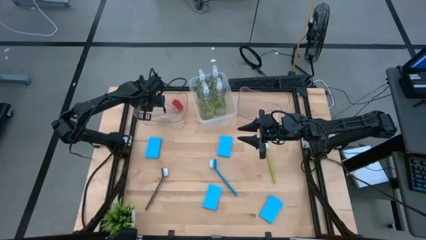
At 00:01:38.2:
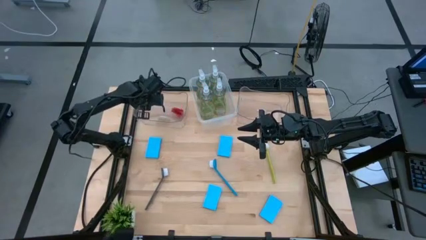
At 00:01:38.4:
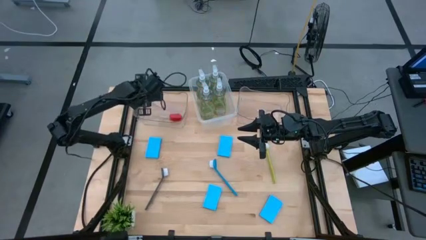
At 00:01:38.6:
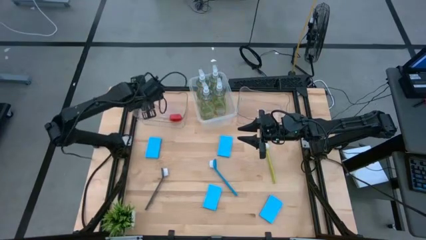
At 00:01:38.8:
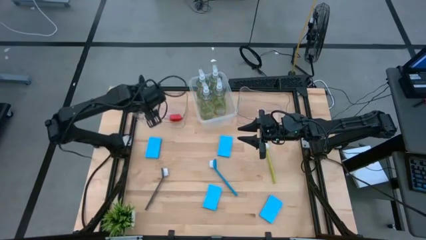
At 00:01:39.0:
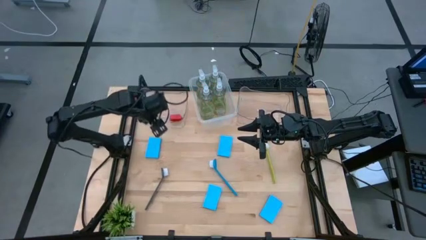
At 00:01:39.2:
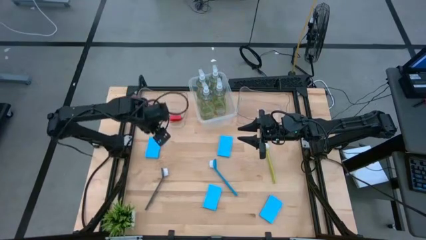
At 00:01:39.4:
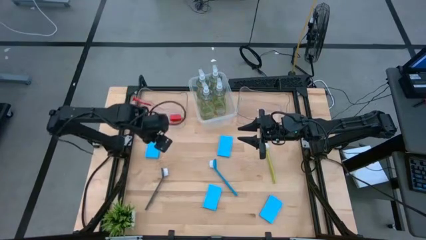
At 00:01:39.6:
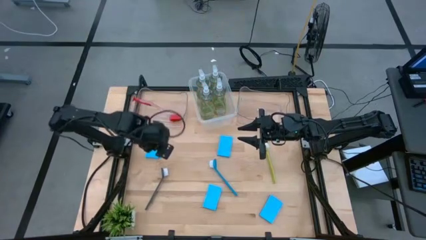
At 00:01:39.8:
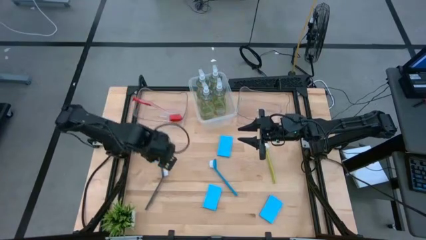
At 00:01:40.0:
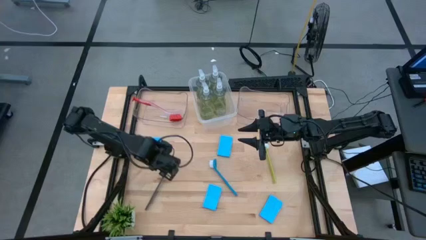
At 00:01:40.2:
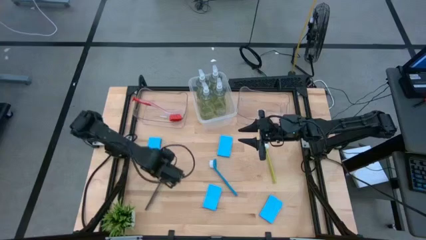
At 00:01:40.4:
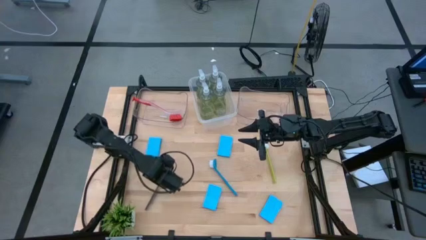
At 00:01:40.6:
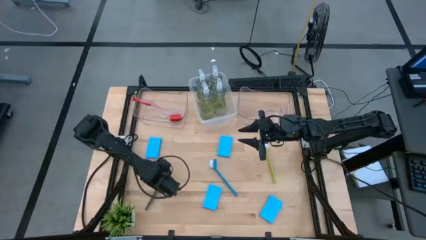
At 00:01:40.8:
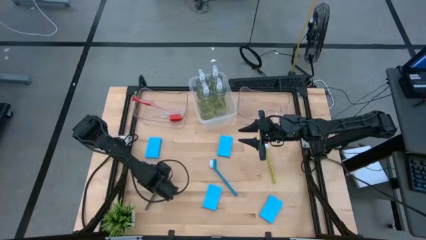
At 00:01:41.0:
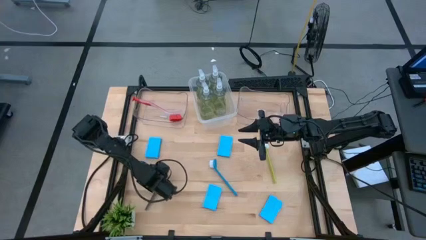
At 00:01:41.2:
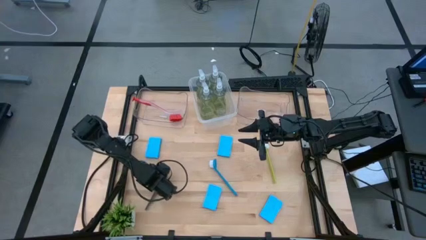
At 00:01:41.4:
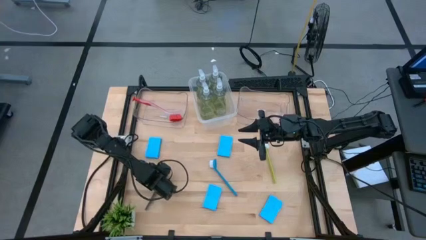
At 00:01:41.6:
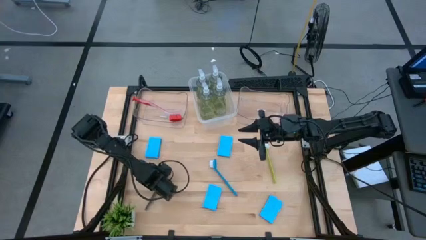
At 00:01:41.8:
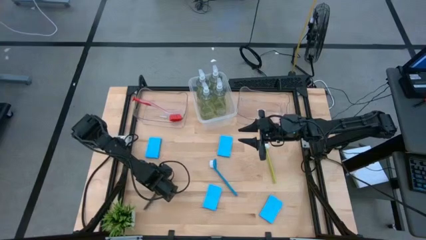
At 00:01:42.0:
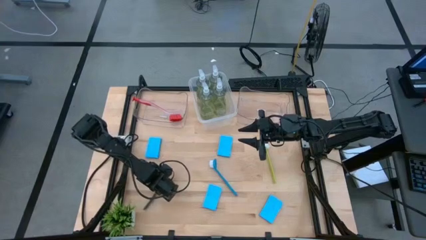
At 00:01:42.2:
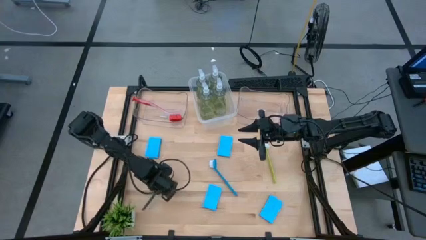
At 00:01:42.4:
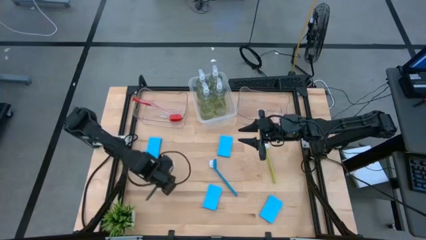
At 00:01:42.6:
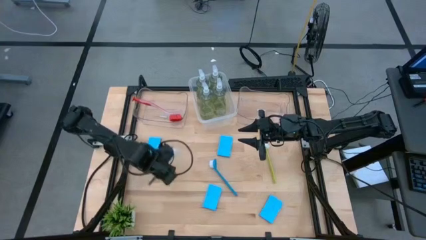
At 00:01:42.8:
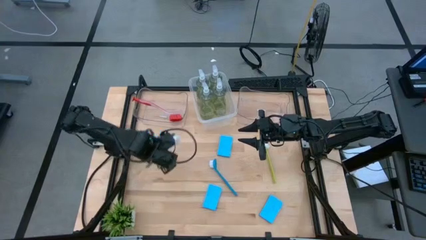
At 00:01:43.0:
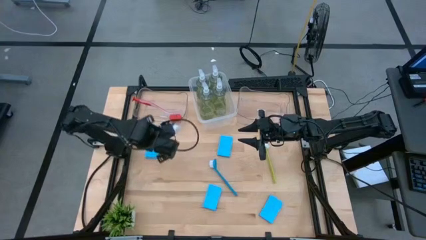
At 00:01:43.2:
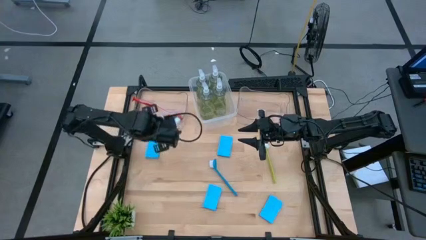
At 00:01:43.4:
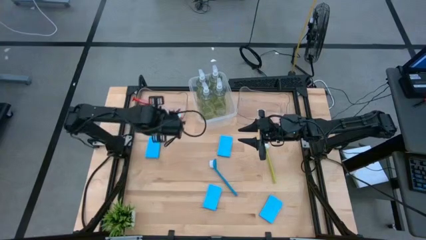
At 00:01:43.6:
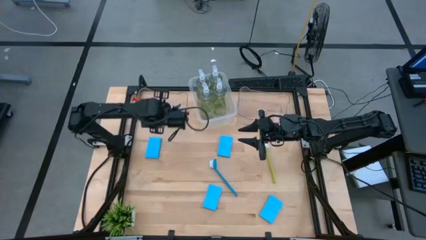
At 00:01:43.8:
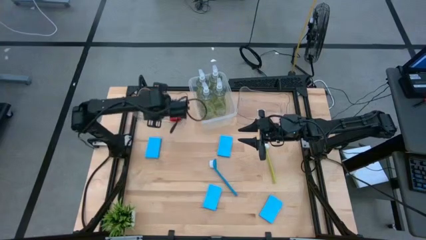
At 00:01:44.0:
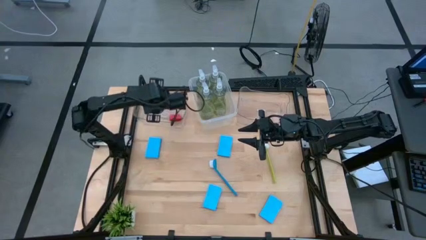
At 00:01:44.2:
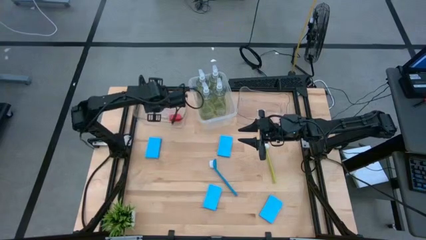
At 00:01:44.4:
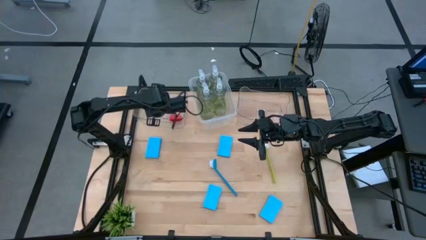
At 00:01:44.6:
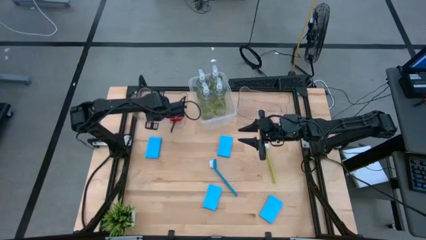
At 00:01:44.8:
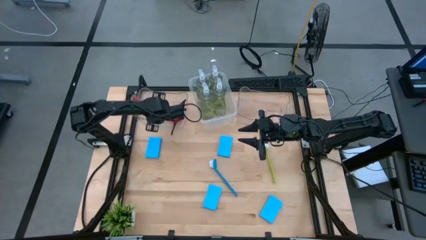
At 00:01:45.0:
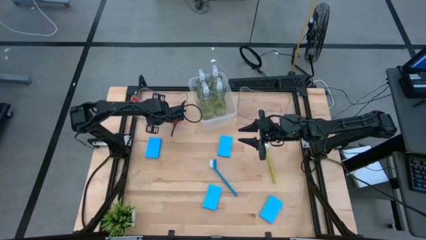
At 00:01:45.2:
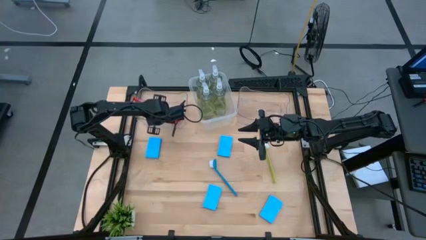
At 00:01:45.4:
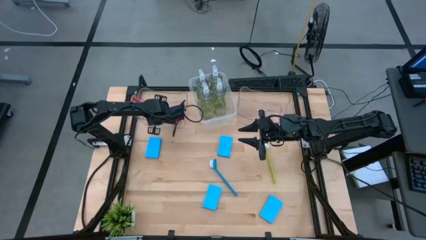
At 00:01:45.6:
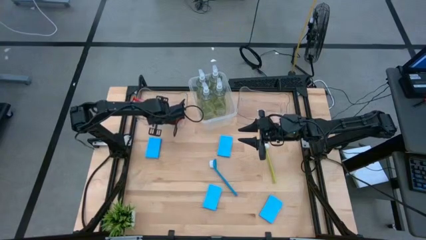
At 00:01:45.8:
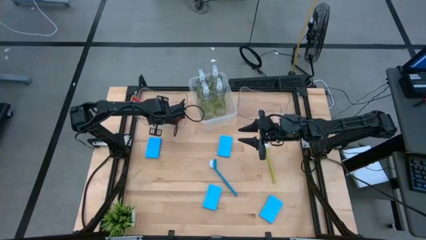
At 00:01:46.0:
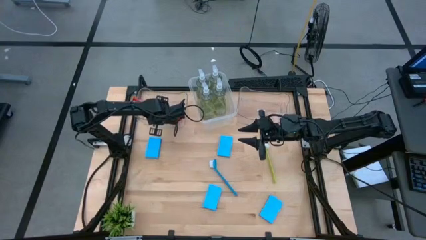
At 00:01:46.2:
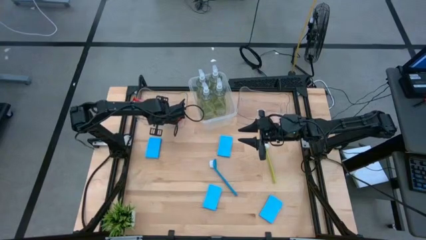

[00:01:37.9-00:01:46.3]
Task: Pick & Place Kitchen Sink Supplies
Put the gray dish brush into the left transparent bin
